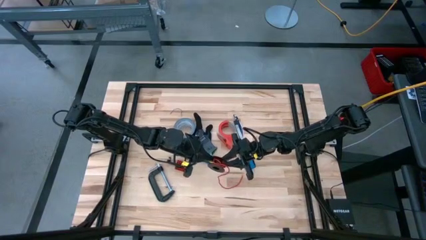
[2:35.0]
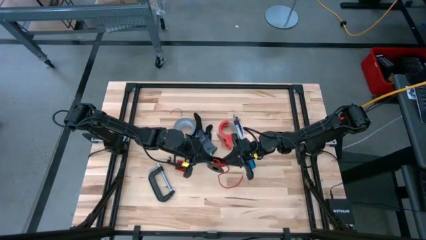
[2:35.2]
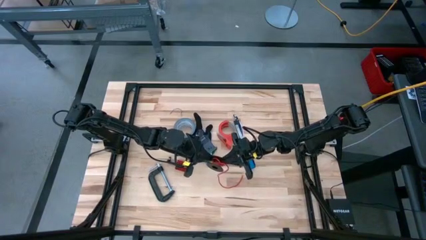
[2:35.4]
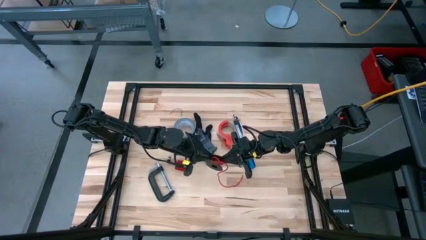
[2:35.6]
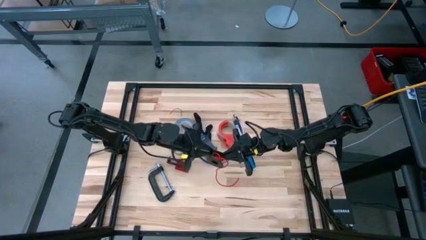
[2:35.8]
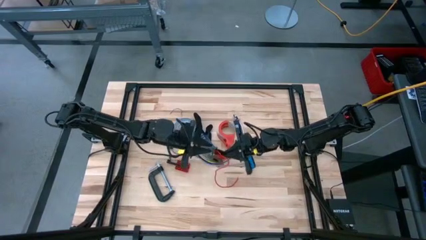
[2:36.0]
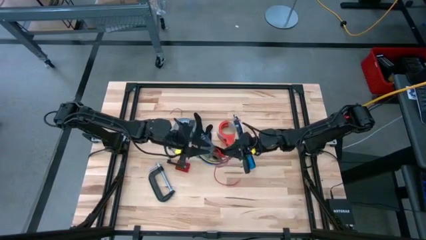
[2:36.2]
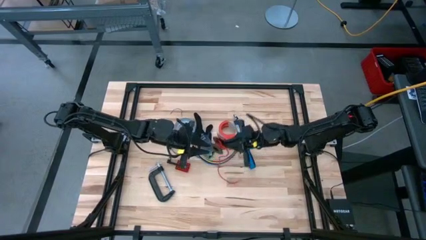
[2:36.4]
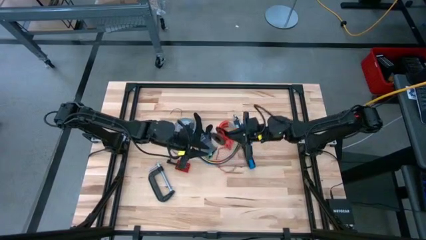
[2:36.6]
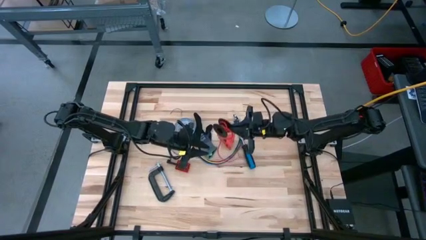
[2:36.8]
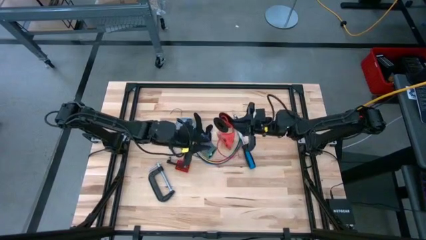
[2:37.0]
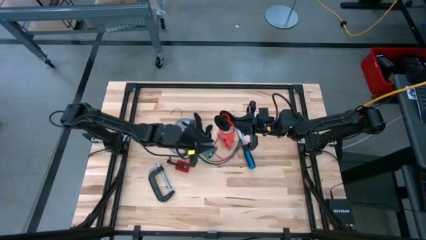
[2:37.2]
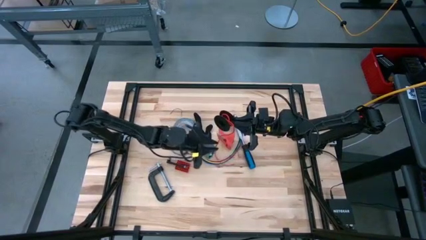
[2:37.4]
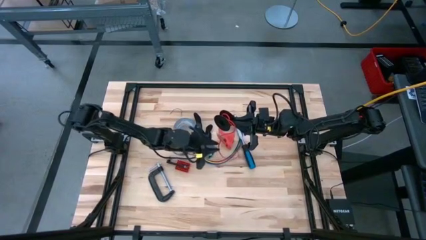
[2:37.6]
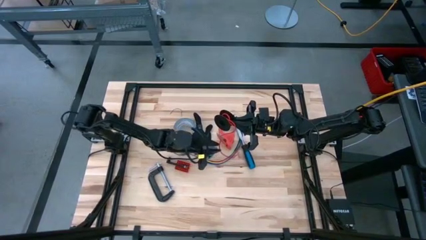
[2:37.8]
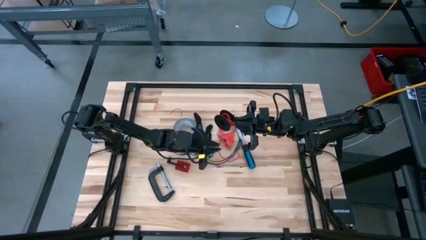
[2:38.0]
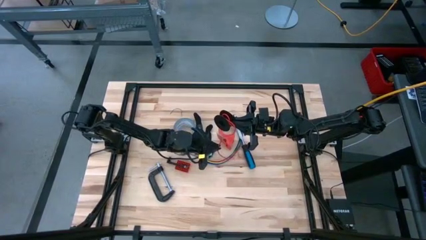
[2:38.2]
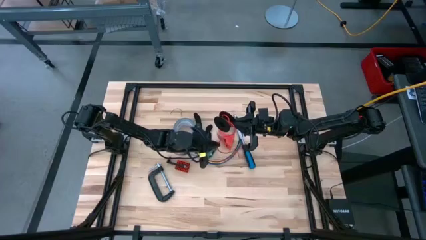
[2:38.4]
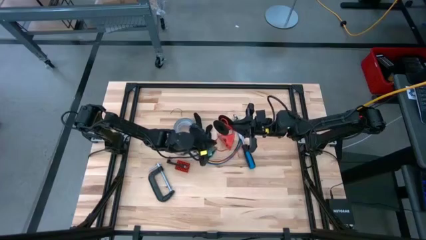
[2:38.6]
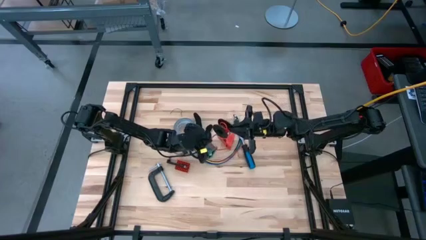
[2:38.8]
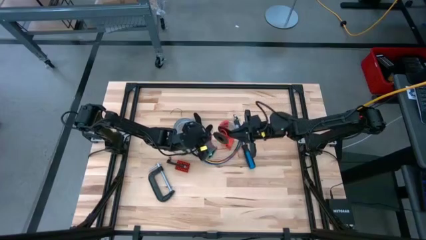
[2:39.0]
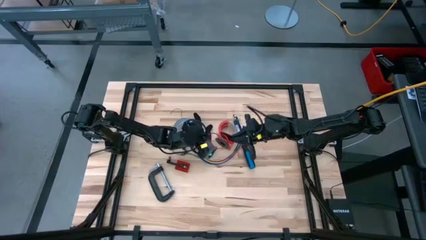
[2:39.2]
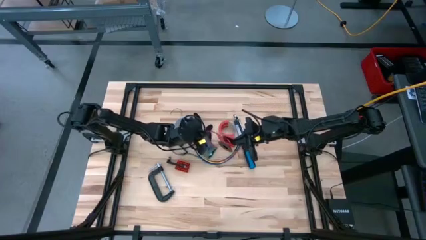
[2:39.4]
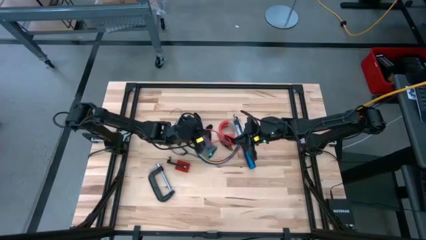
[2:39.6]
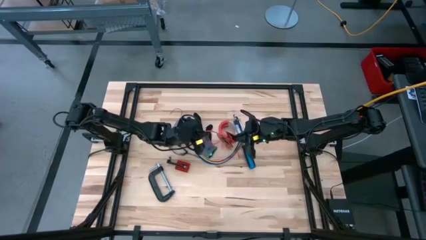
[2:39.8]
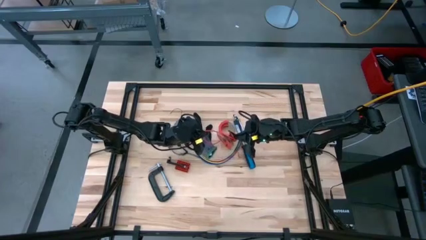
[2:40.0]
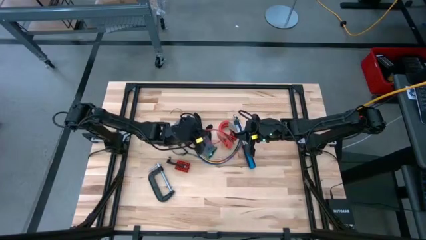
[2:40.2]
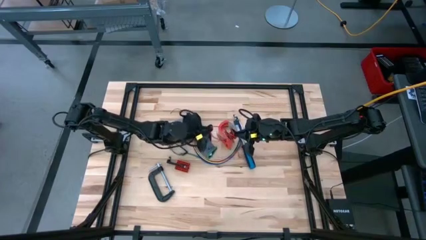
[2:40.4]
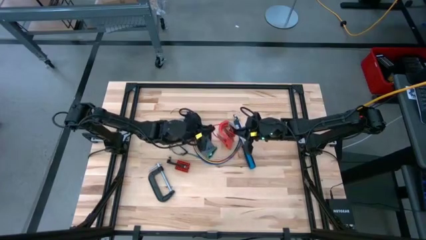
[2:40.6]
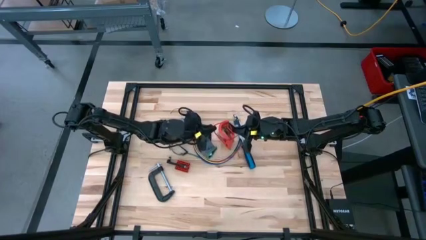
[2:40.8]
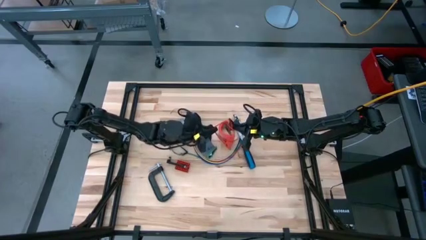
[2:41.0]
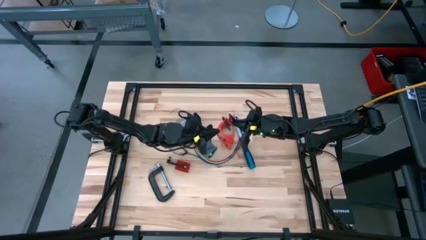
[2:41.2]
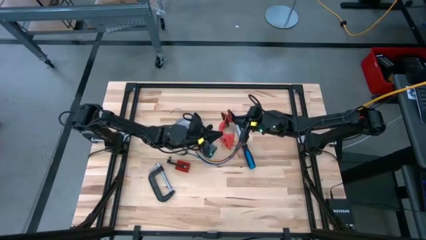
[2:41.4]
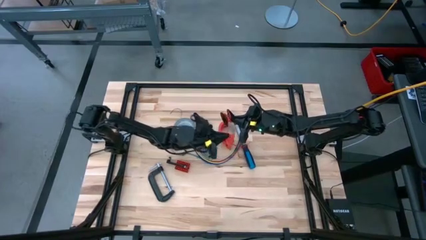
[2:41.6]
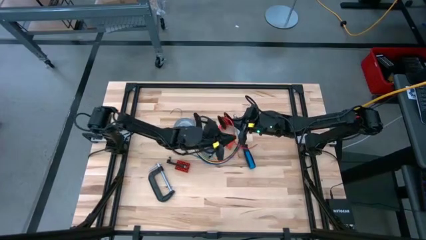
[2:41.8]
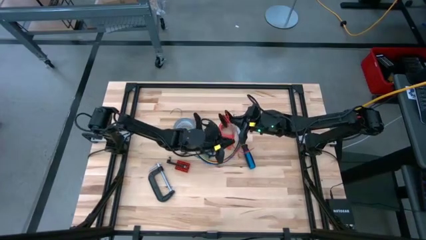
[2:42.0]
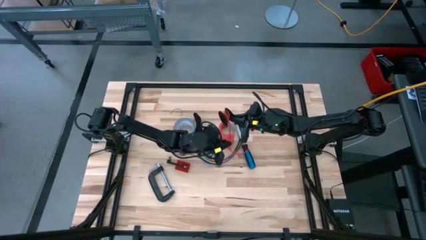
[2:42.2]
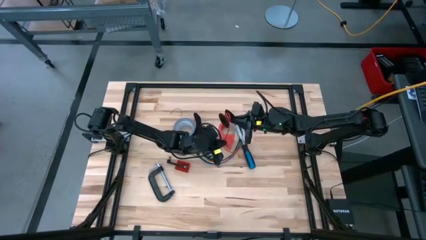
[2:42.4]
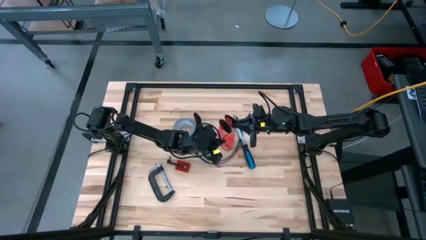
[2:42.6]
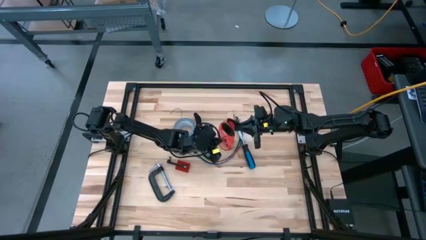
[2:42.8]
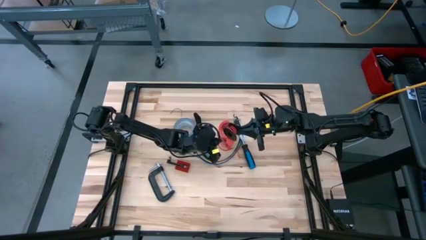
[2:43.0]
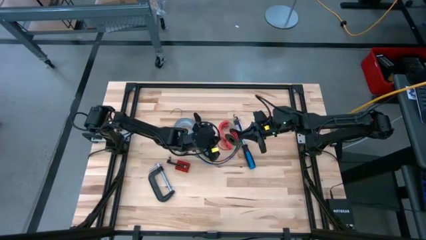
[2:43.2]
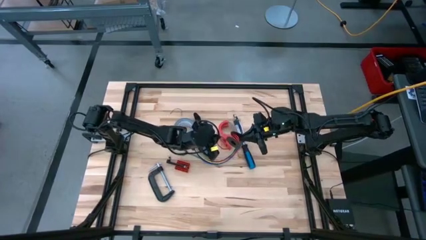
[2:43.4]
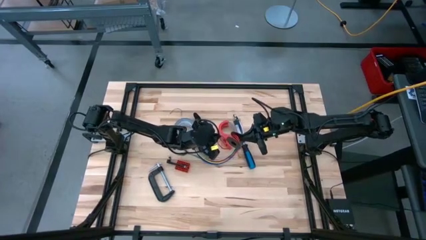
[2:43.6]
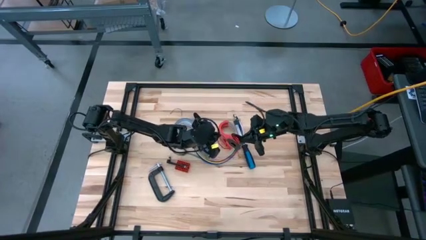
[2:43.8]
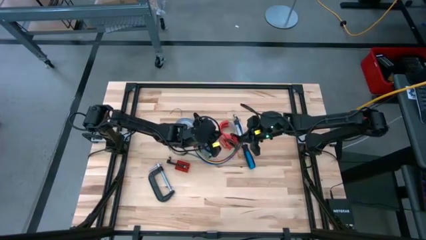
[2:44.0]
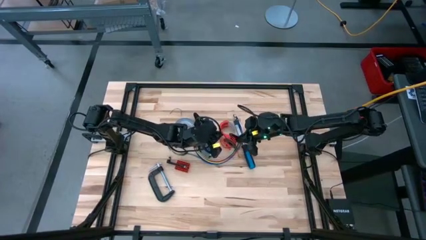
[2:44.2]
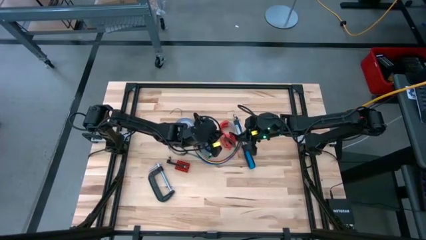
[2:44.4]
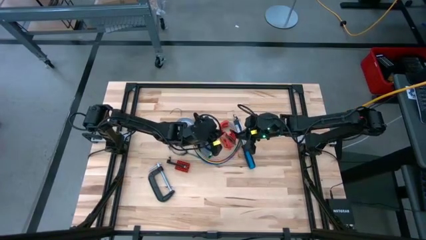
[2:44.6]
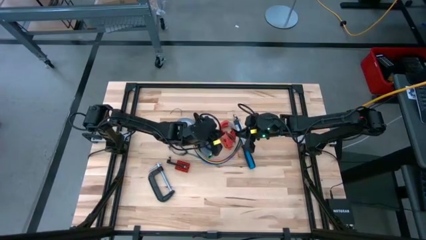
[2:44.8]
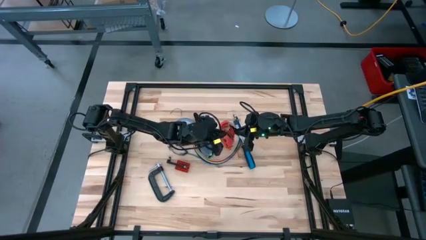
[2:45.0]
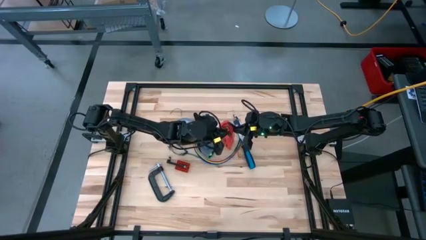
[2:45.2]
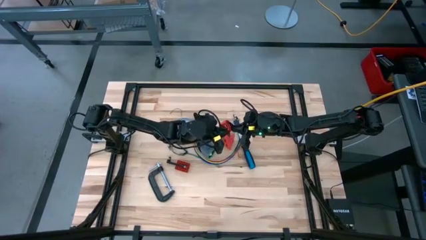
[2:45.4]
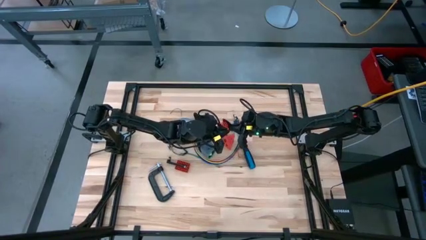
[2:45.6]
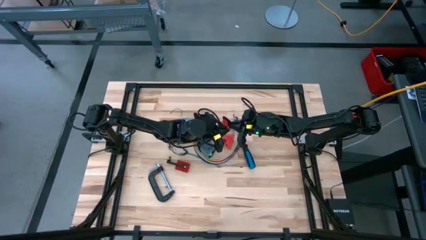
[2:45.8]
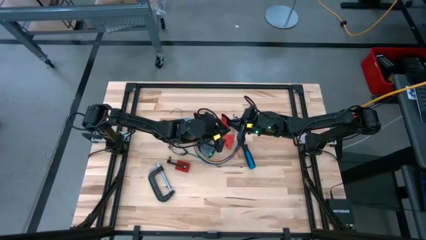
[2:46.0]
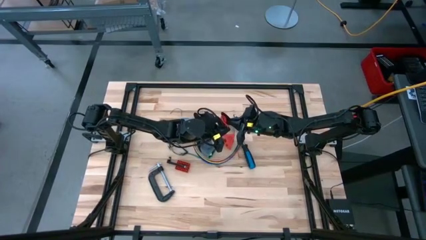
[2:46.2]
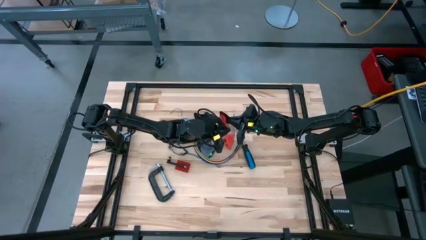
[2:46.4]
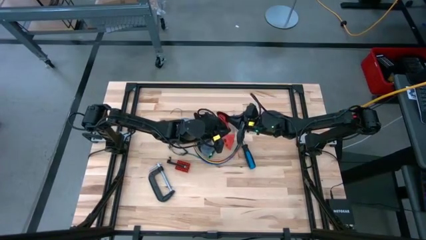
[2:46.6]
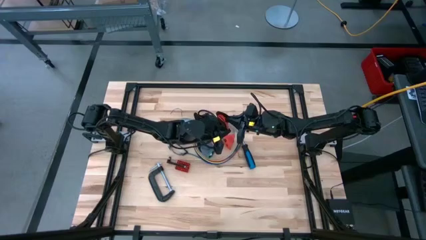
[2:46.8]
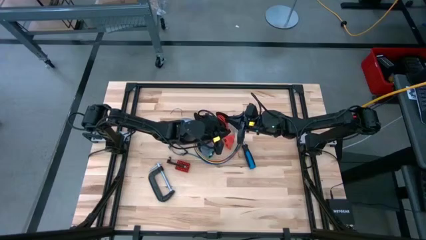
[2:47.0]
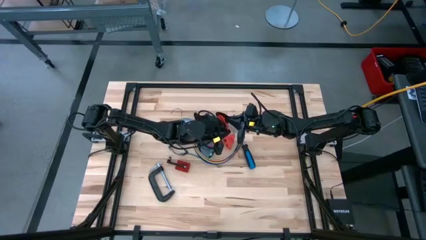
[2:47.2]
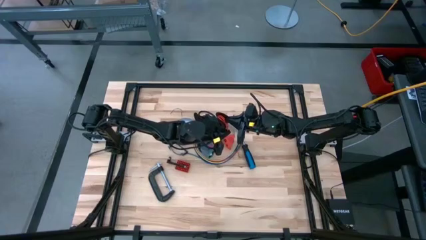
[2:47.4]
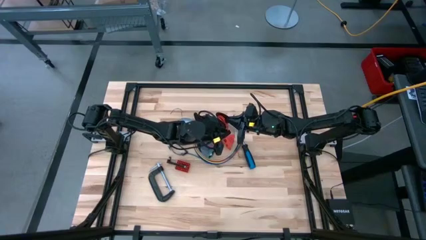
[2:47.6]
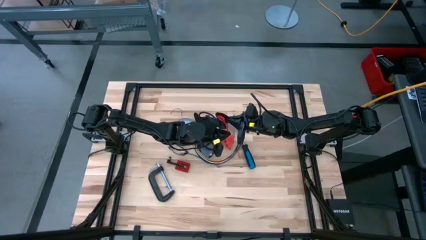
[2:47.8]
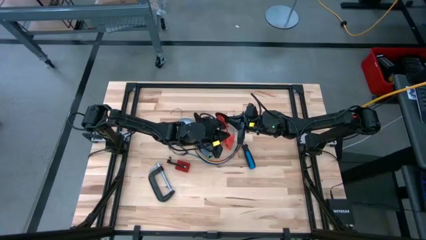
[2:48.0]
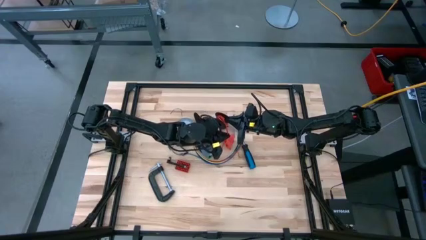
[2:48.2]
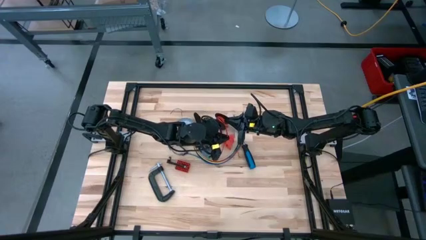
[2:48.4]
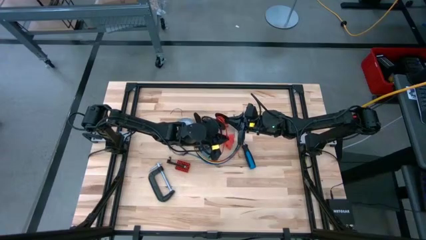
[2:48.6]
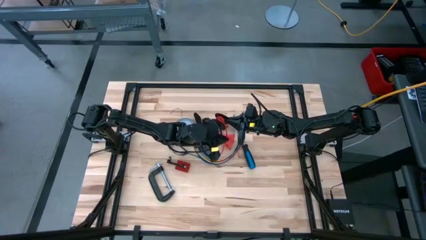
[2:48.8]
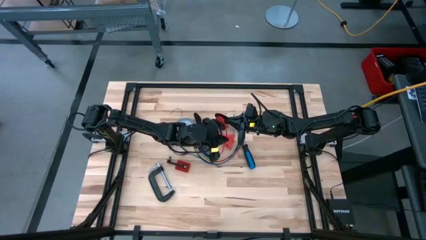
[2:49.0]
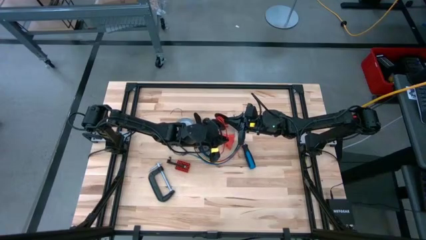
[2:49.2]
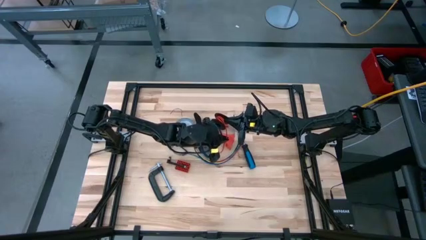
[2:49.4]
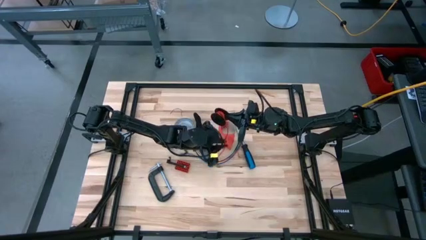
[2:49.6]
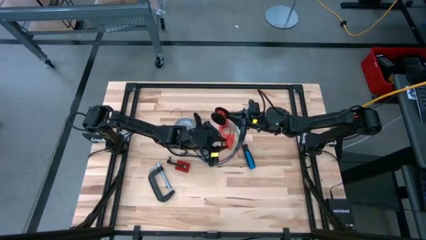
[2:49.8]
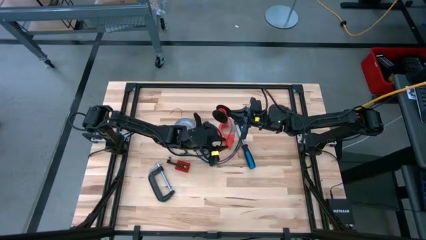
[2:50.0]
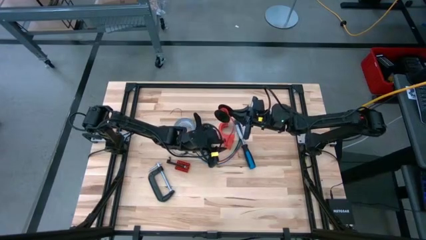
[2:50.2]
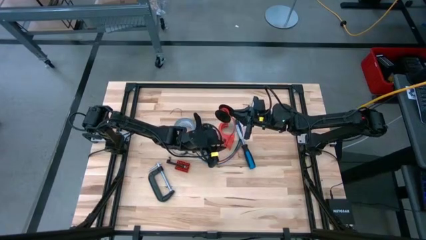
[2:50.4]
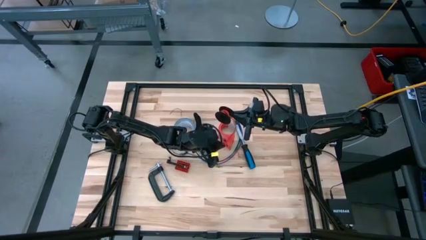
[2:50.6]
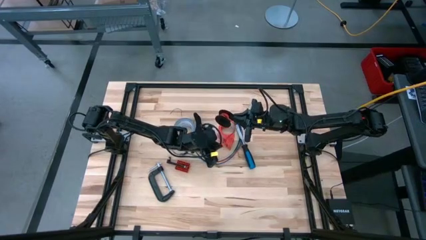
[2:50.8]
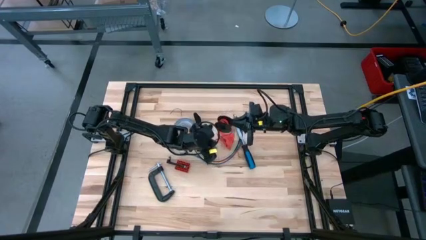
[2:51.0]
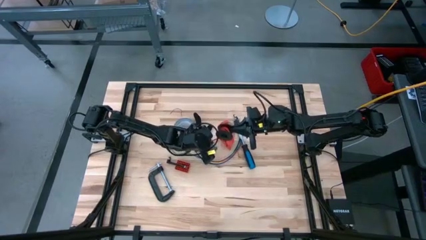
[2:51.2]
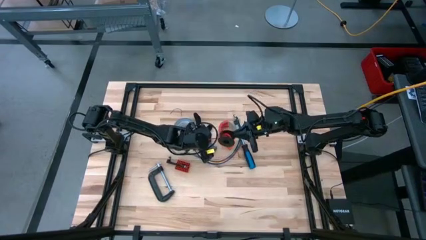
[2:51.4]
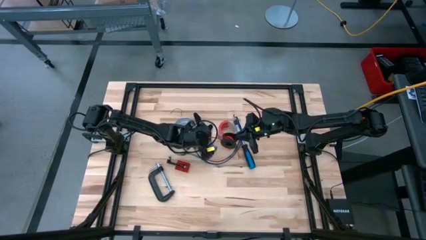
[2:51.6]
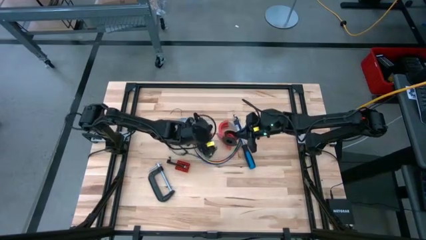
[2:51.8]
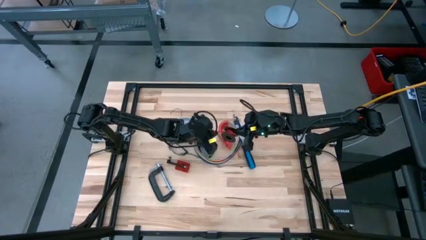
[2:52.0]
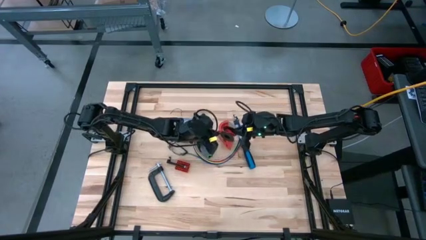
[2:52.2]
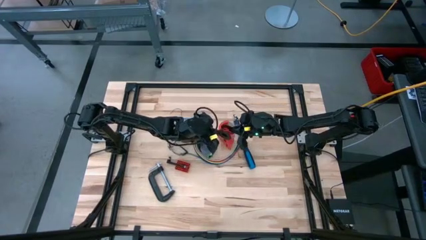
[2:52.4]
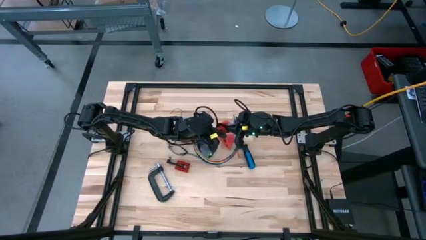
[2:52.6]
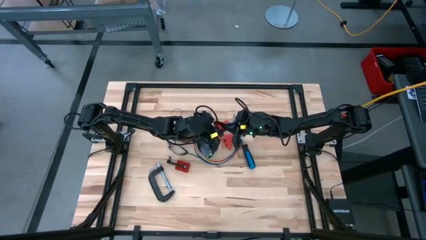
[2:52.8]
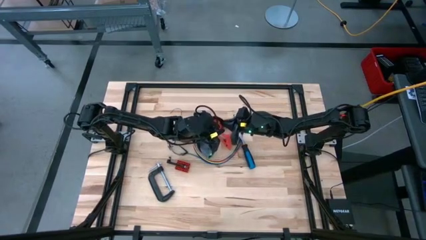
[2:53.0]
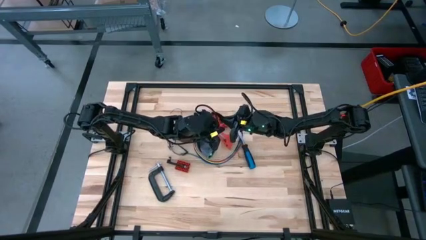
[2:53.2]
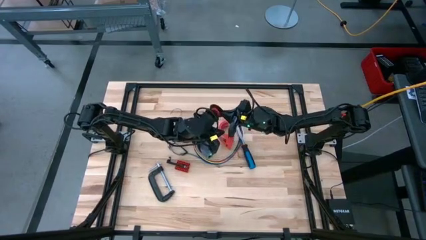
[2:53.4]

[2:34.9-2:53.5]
Task: Coil cords
Coil the red wire cable onto the black spool
